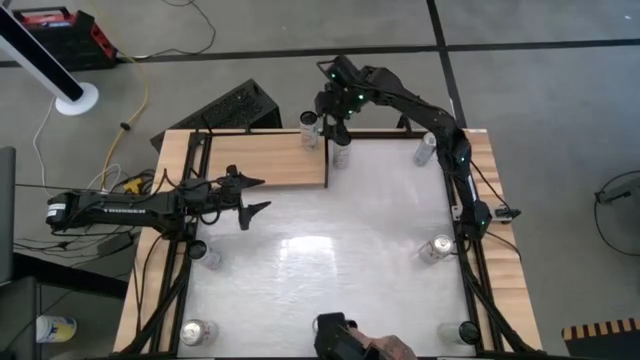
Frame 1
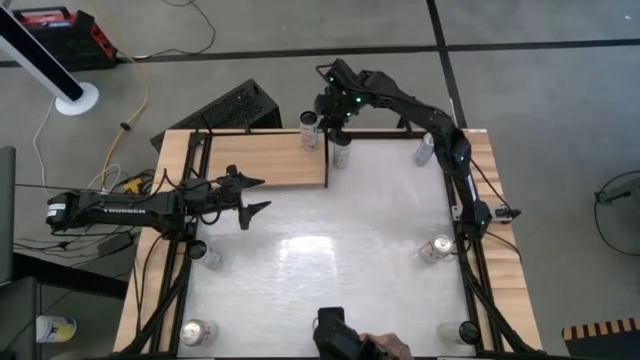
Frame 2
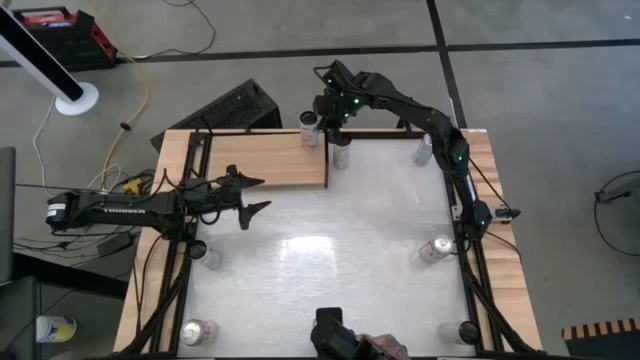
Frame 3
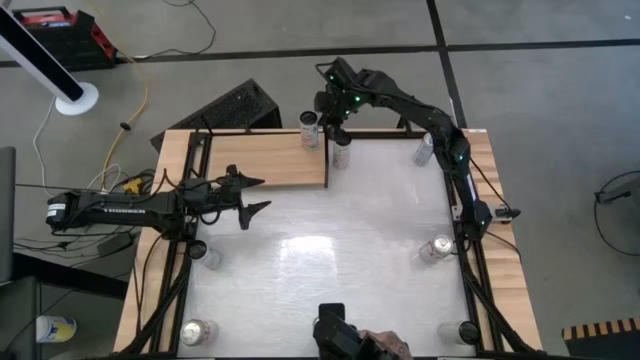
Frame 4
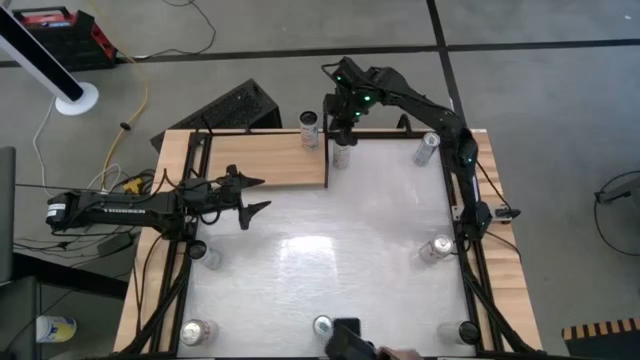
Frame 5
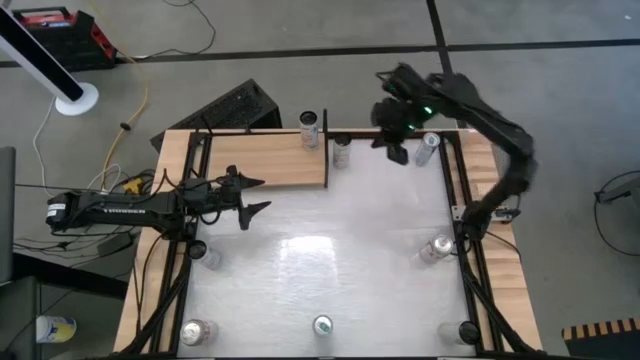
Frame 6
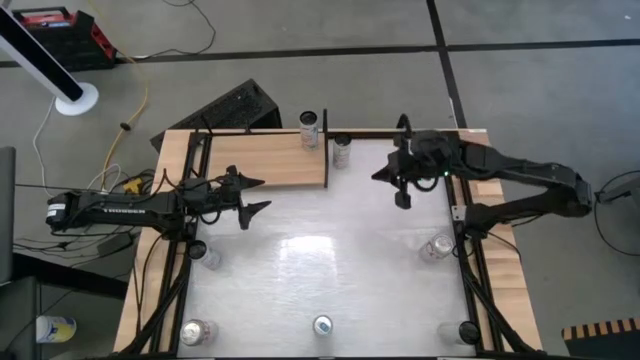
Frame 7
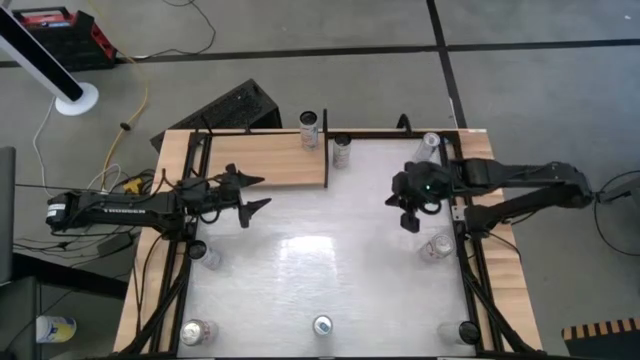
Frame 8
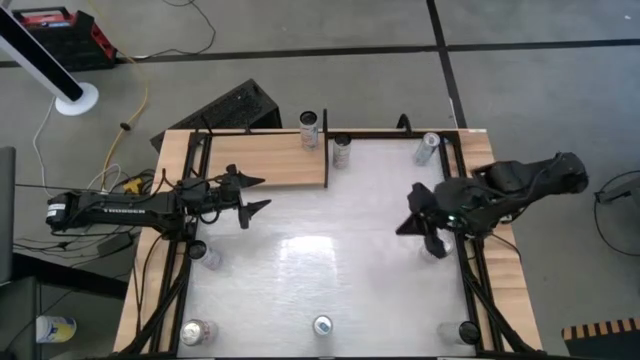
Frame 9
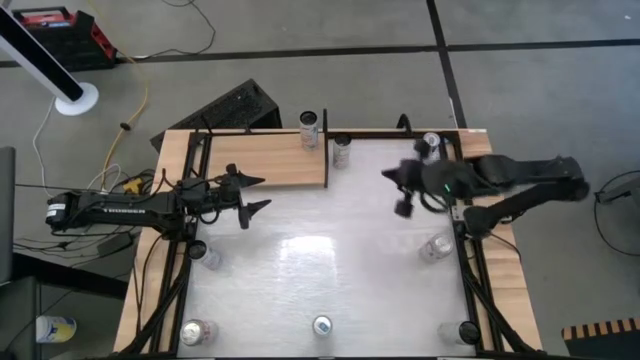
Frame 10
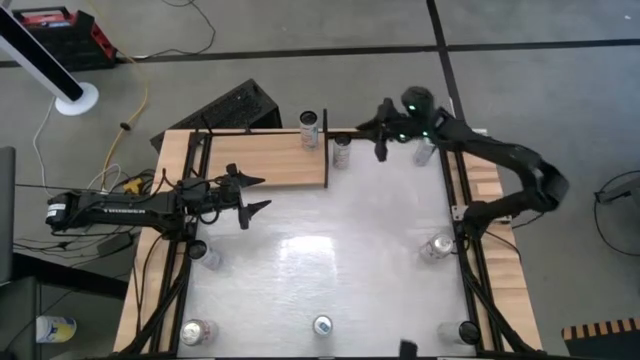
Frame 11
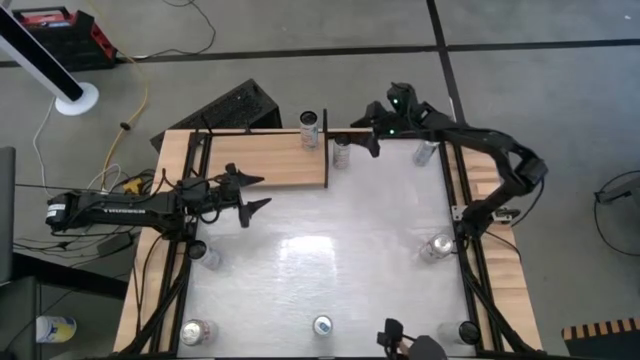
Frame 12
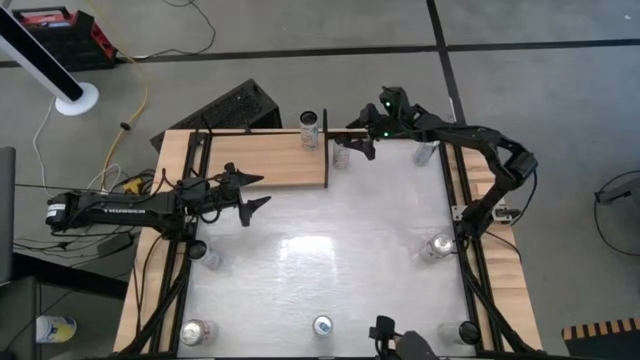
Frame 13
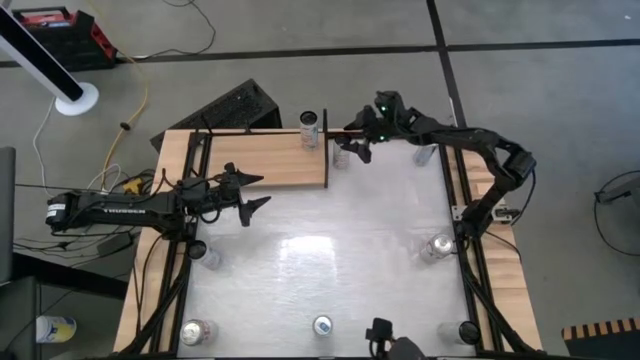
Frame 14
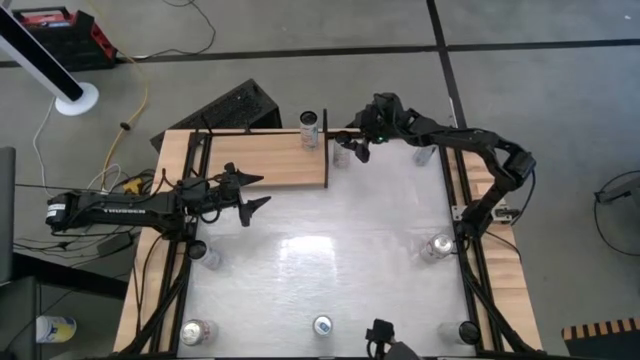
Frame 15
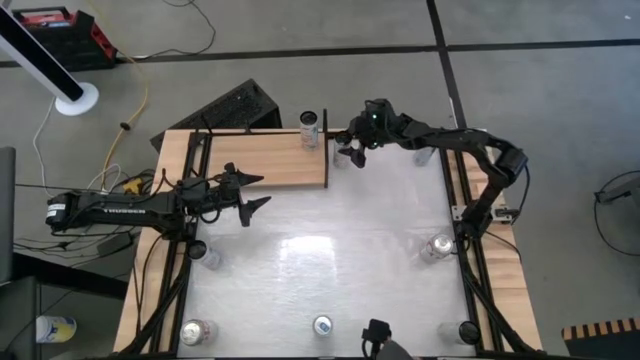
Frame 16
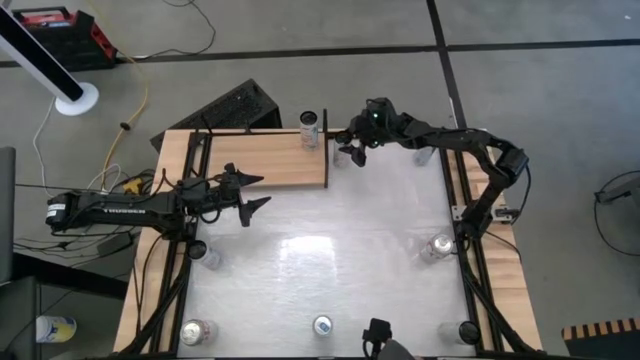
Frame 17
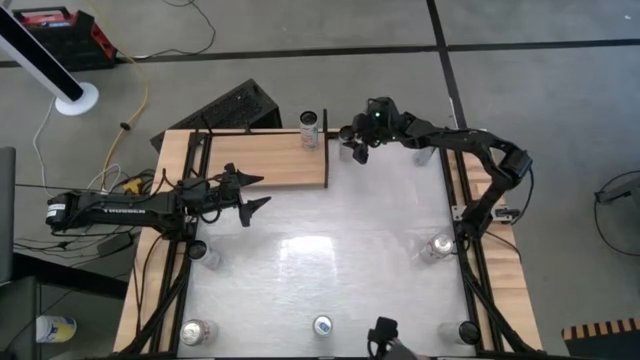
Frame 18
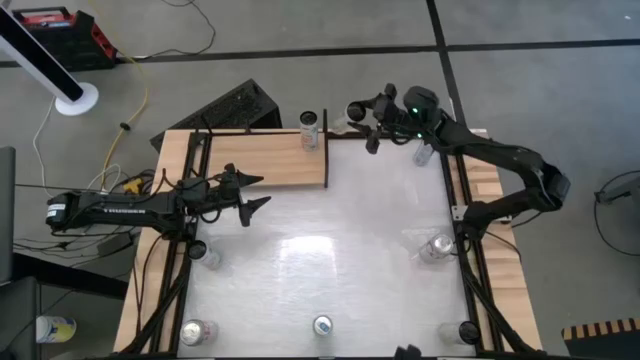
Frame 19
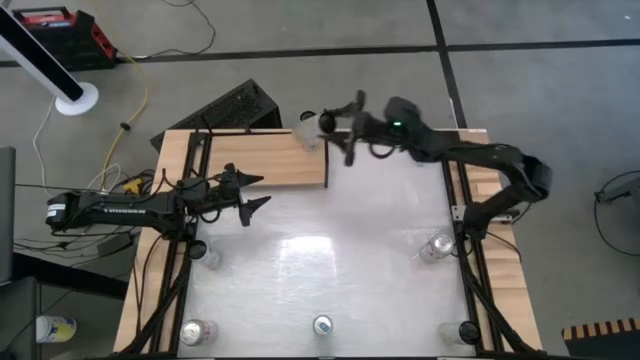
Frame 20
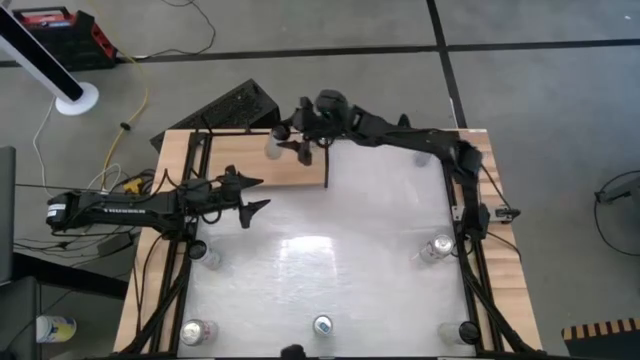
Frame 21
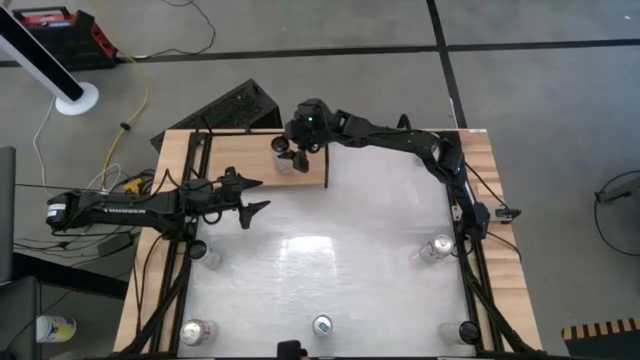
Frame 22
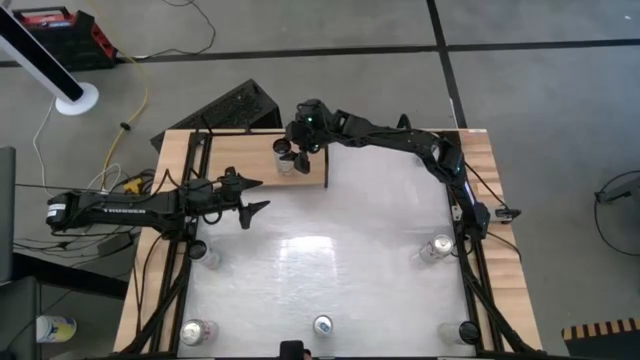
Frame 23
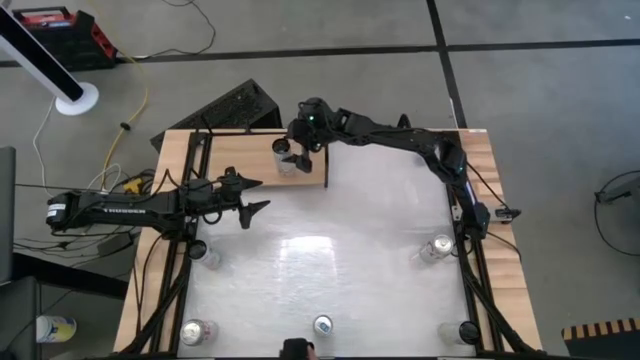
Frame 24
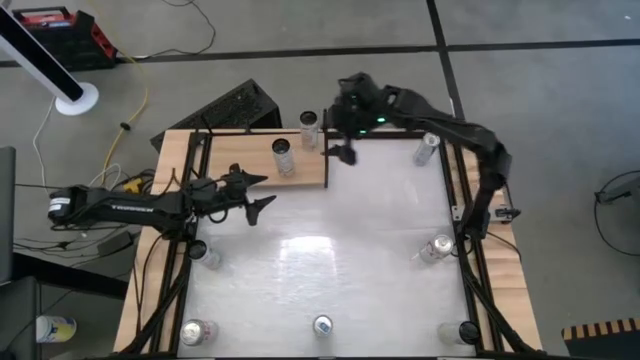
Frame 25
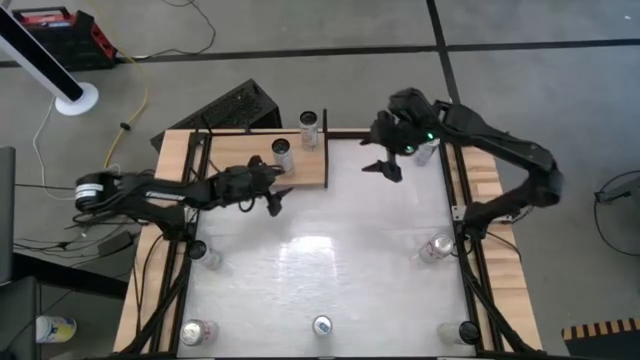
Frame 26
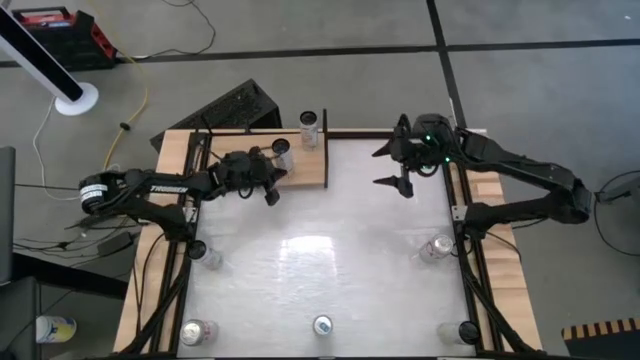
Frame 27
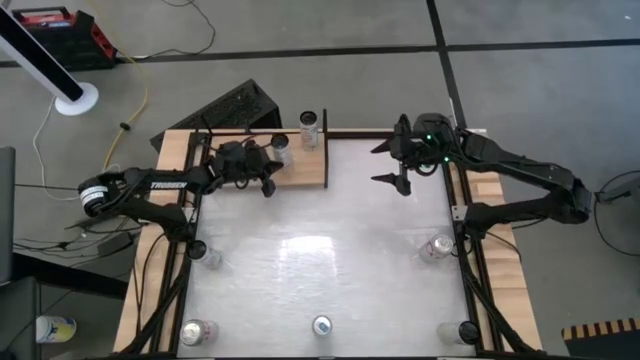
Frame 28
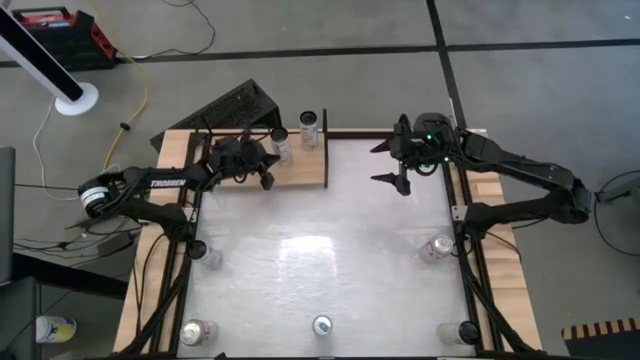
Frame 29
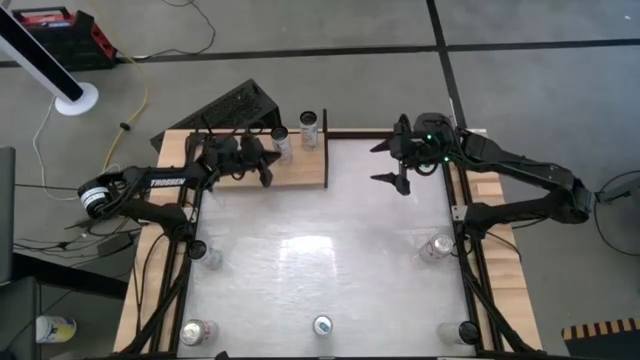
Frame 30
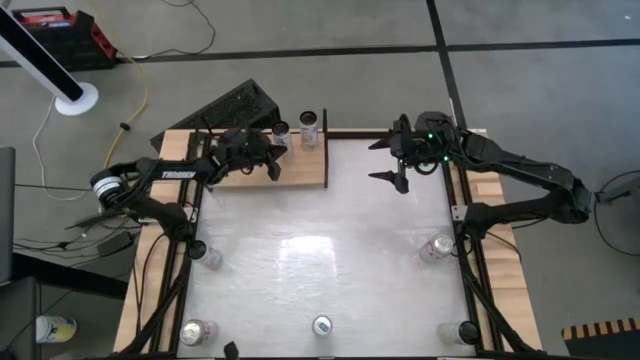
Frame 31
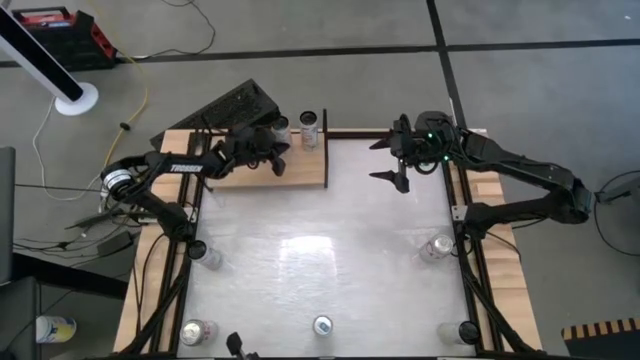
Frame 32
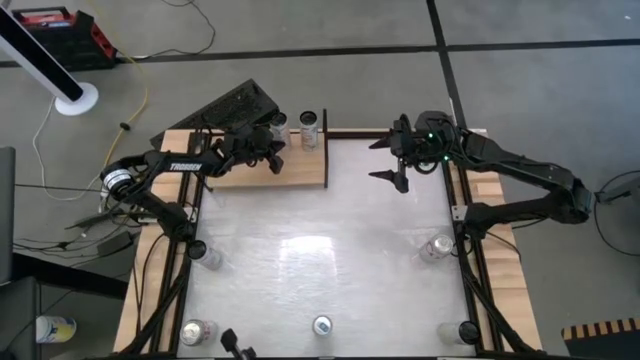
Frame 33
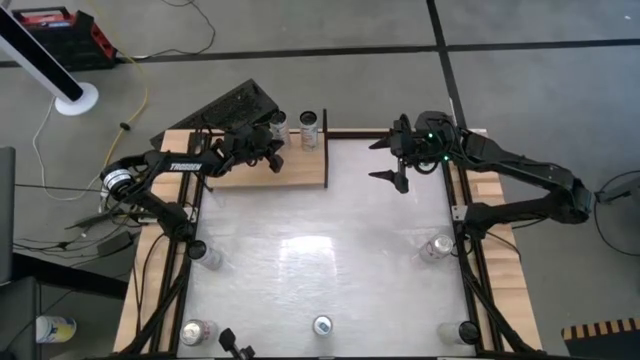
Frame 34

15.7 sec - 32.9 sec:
Task: Place canned beverage on shelf
Put the top tropical vibe celsius soda can beside the peach vibe celsius soda can on the shelf

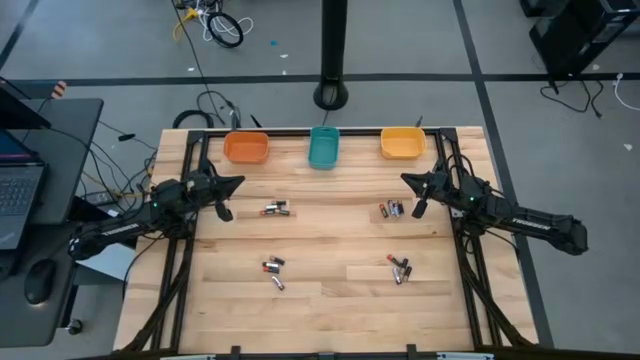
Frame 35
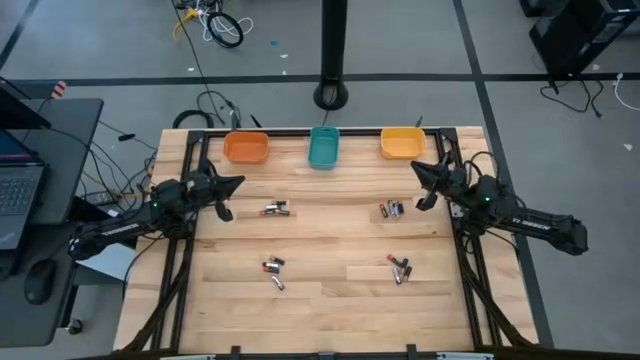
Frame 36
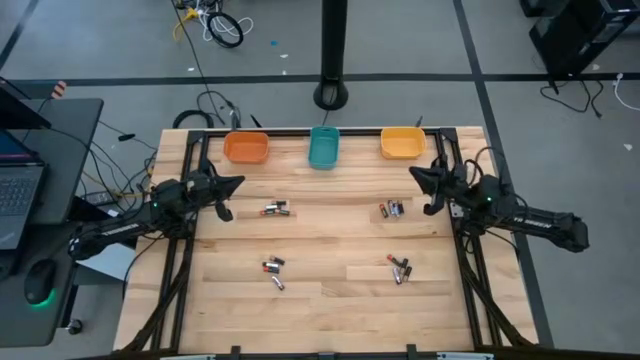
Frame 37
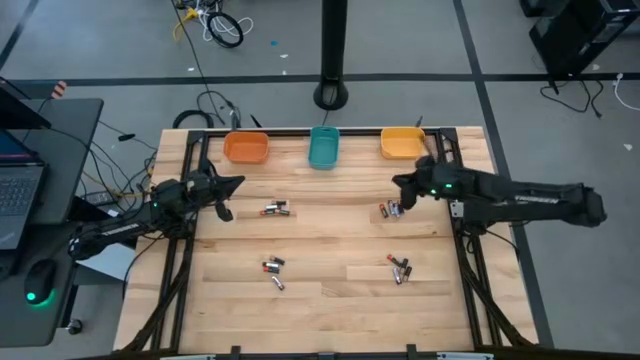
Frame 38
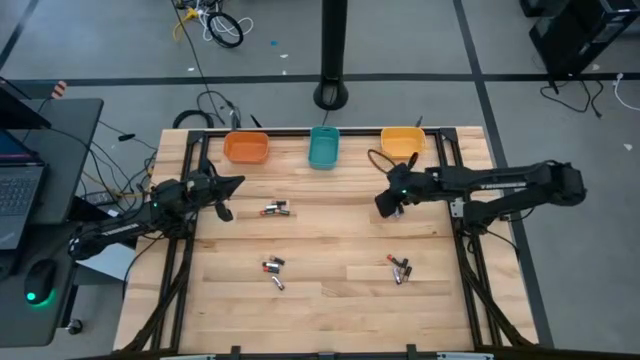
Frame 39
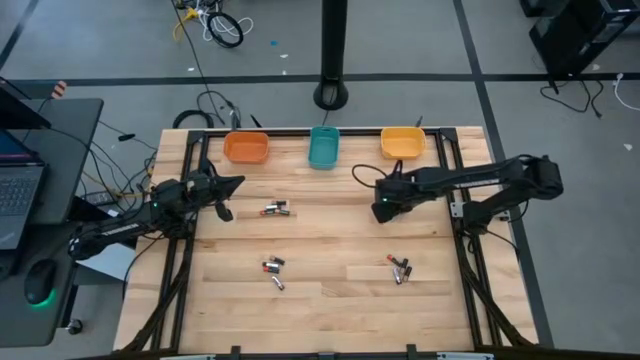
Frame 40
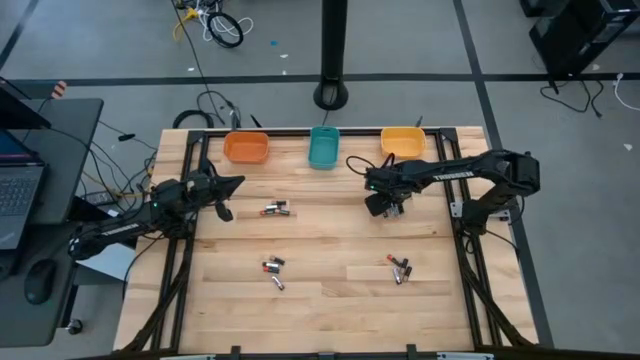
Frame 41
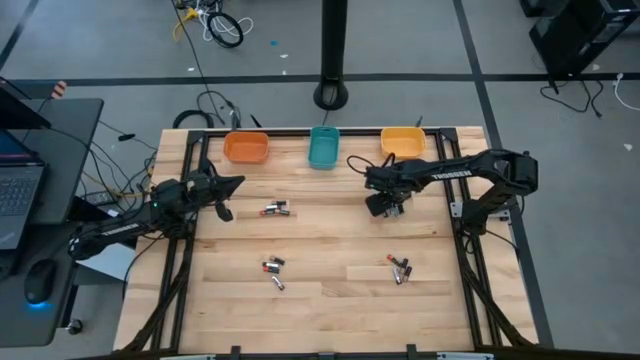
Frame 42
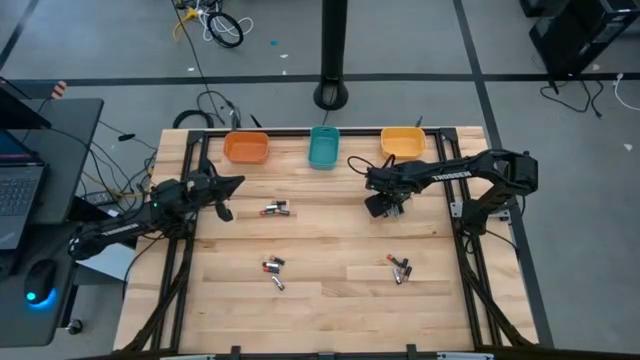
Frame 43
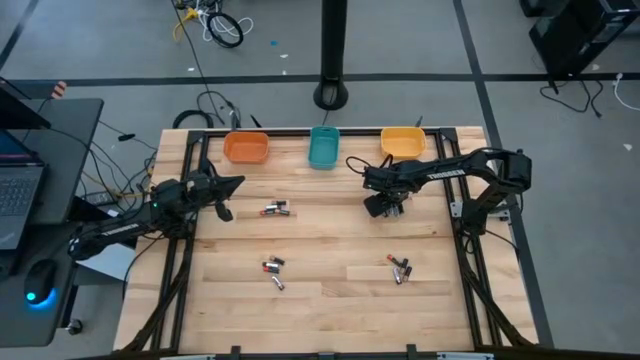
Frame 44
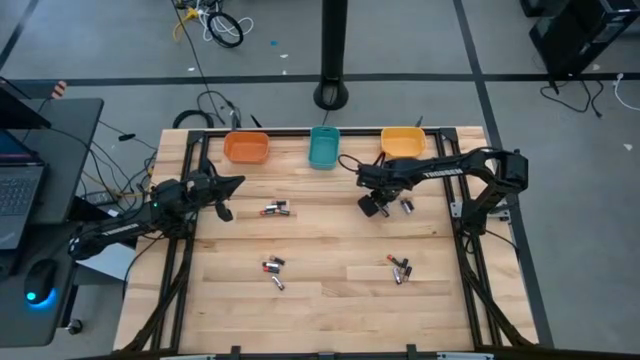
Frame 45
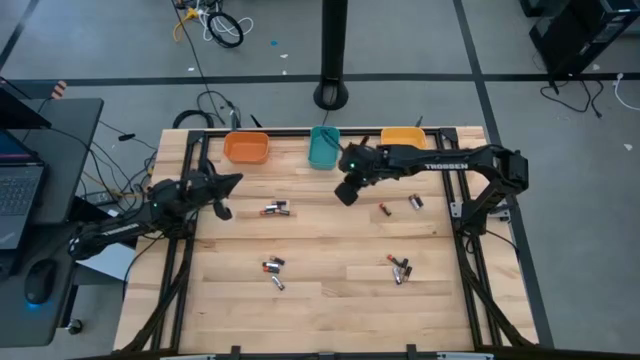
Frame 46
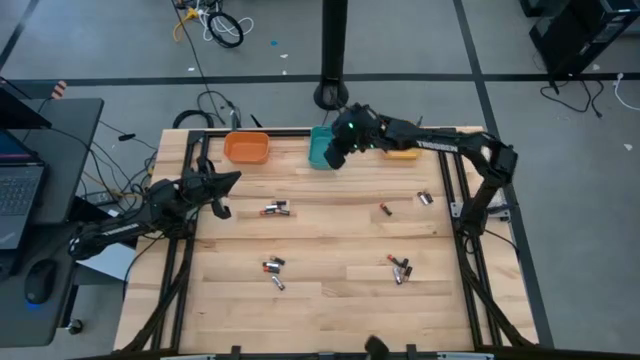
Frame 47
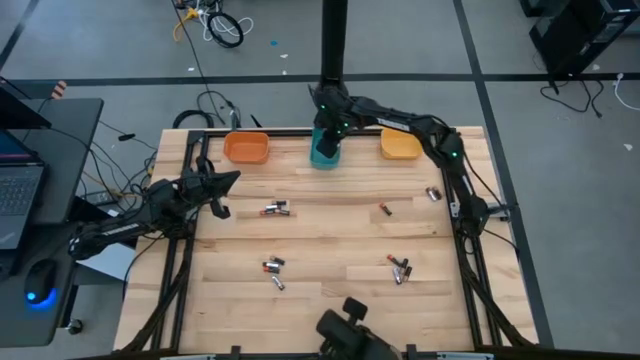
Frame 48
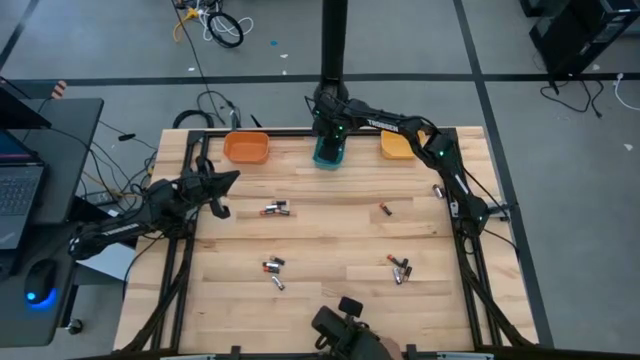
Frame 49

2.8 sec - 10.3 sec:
Task: Sort batteries
Put the black-silver battery in the green bin
